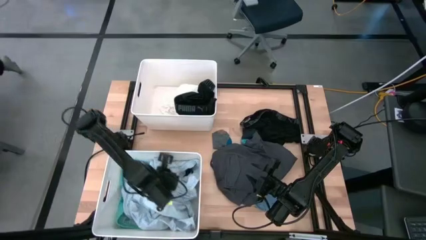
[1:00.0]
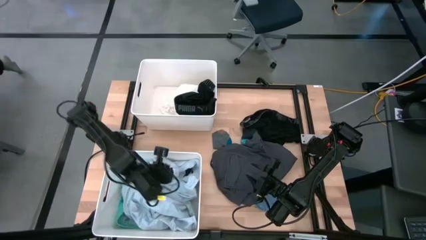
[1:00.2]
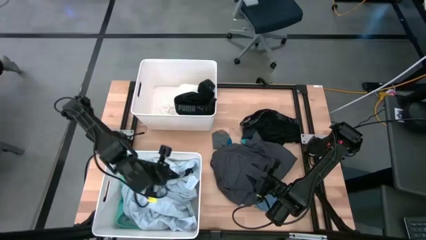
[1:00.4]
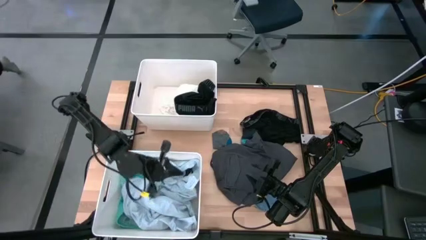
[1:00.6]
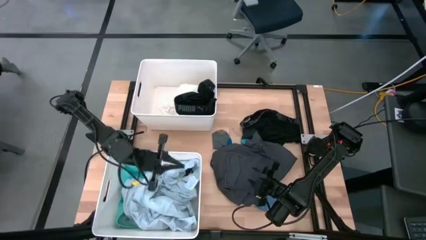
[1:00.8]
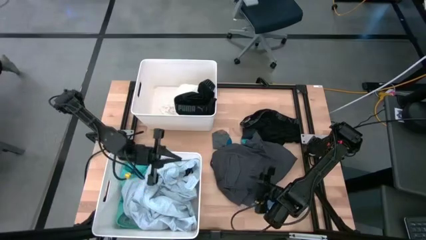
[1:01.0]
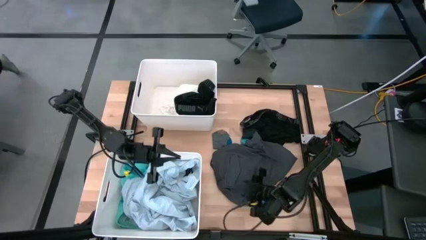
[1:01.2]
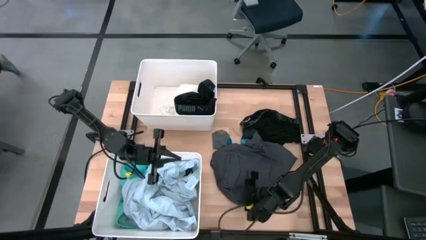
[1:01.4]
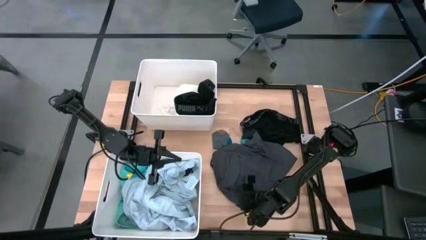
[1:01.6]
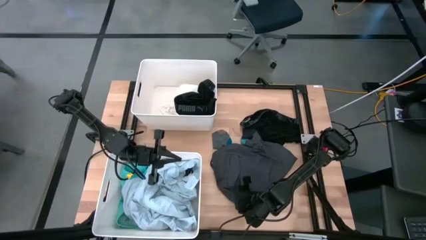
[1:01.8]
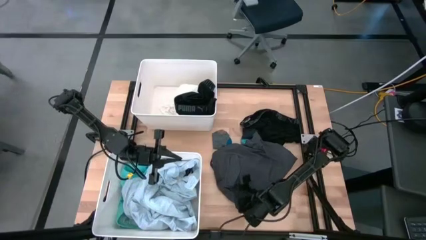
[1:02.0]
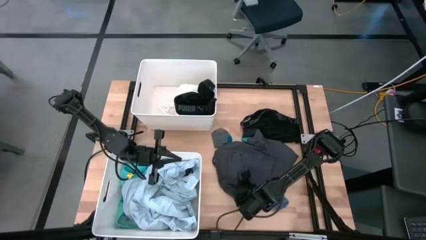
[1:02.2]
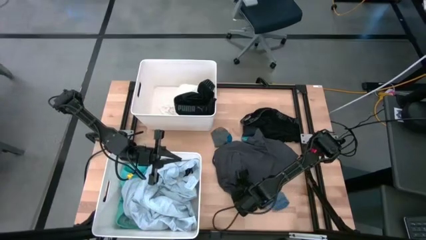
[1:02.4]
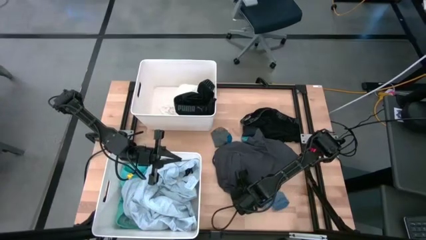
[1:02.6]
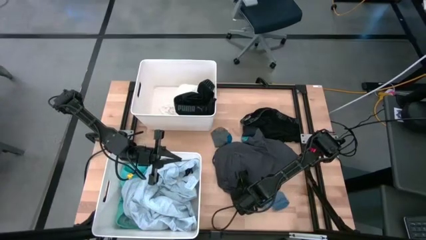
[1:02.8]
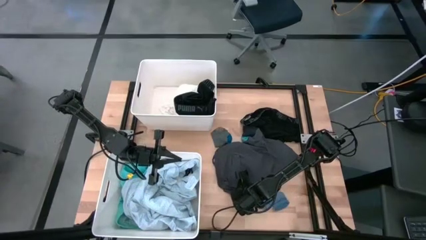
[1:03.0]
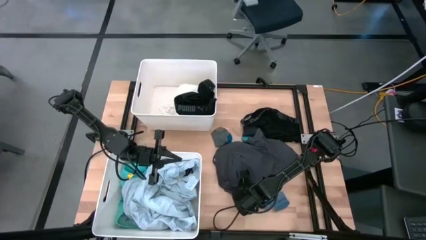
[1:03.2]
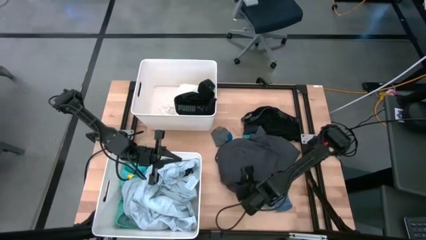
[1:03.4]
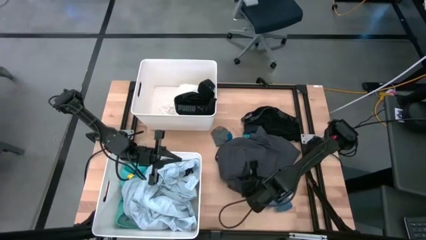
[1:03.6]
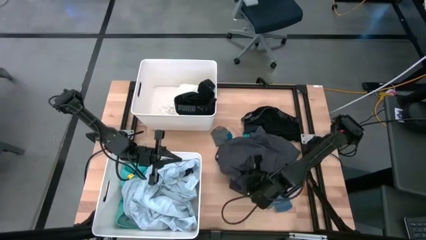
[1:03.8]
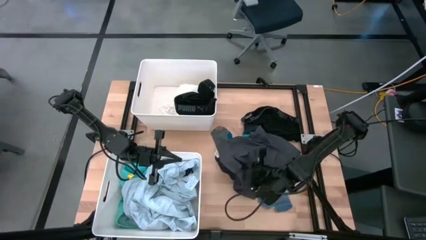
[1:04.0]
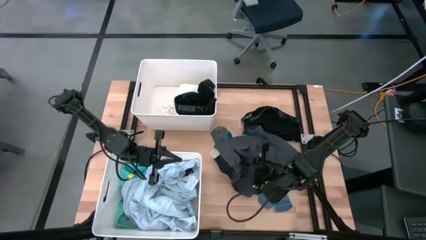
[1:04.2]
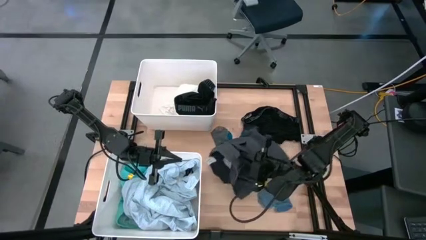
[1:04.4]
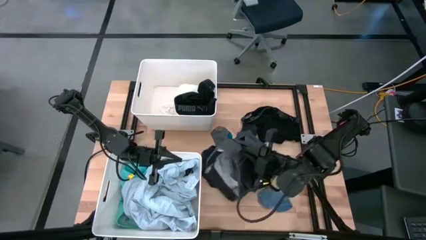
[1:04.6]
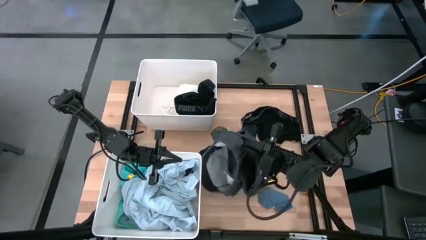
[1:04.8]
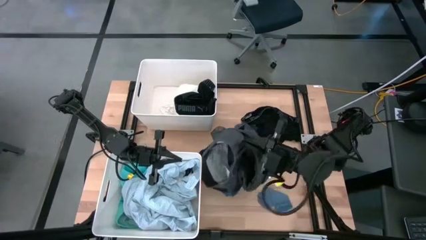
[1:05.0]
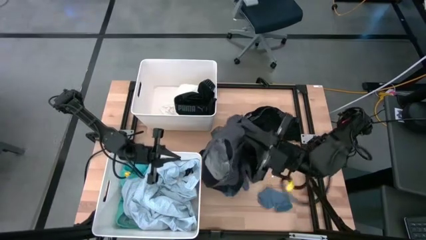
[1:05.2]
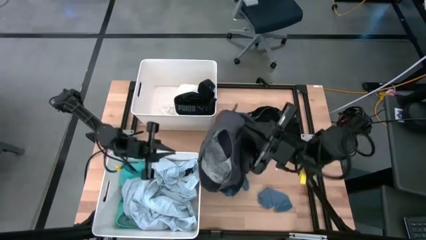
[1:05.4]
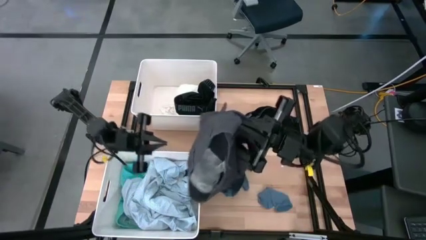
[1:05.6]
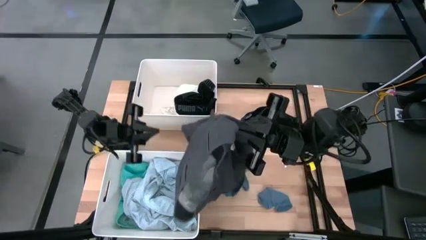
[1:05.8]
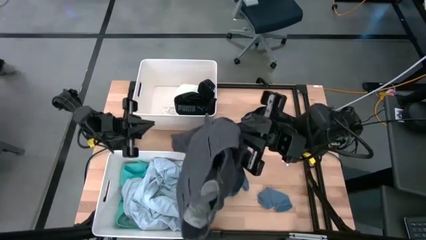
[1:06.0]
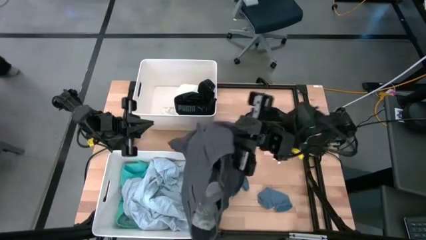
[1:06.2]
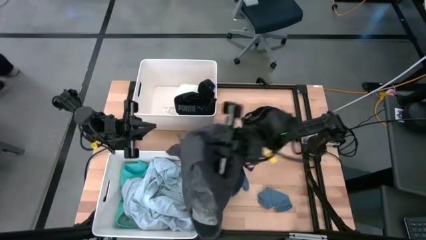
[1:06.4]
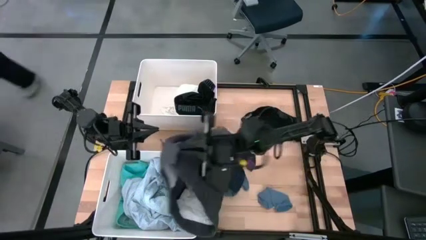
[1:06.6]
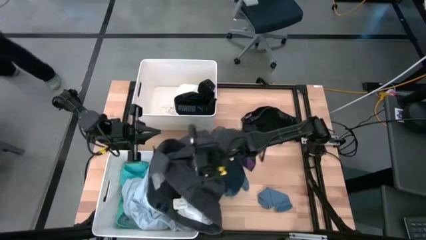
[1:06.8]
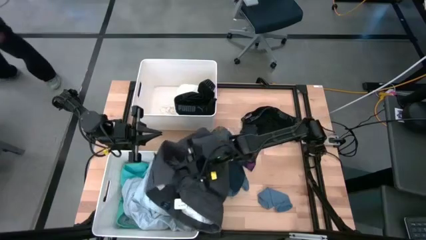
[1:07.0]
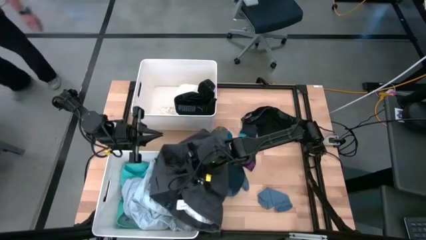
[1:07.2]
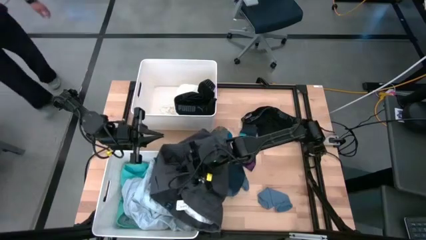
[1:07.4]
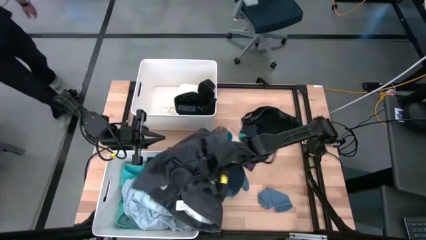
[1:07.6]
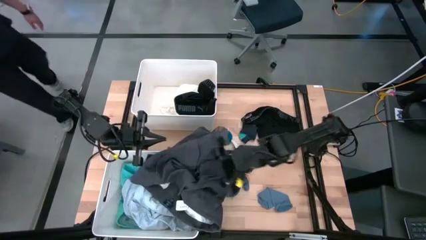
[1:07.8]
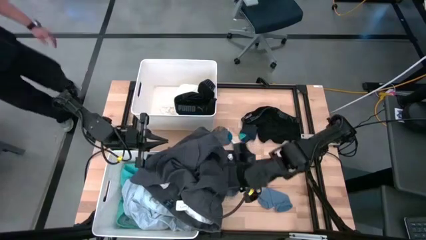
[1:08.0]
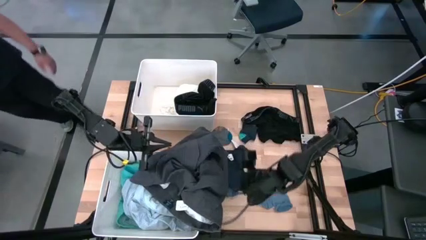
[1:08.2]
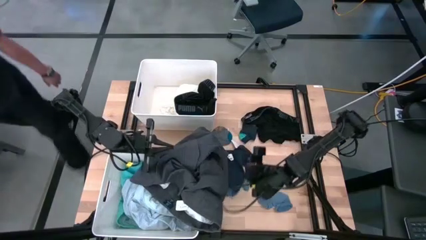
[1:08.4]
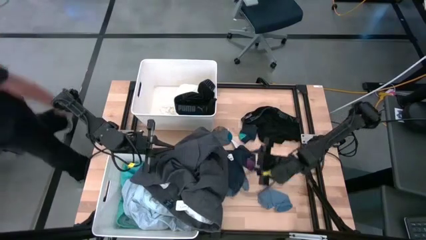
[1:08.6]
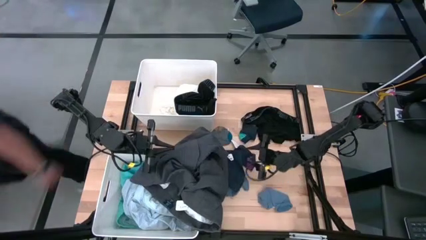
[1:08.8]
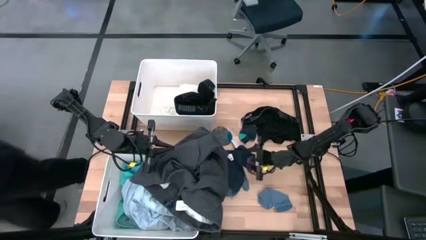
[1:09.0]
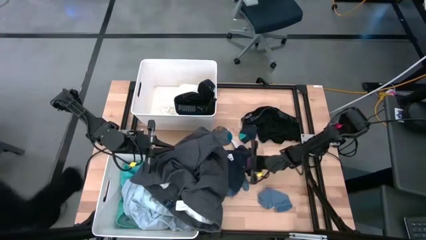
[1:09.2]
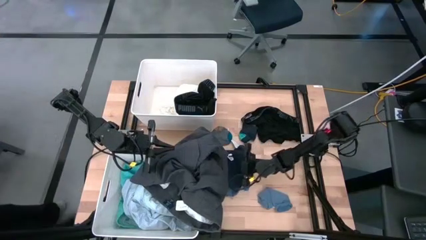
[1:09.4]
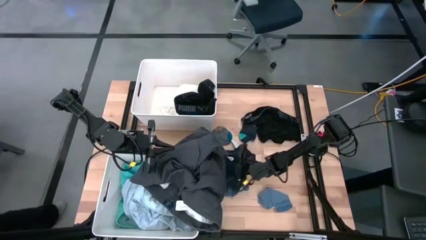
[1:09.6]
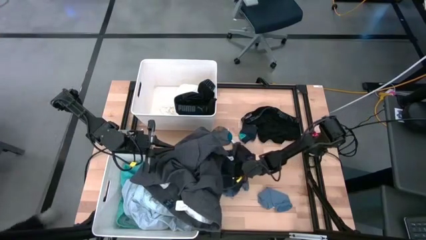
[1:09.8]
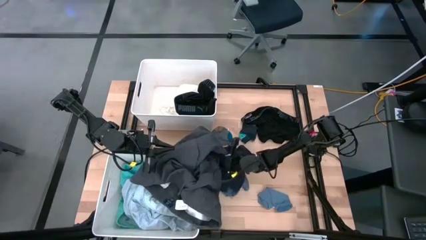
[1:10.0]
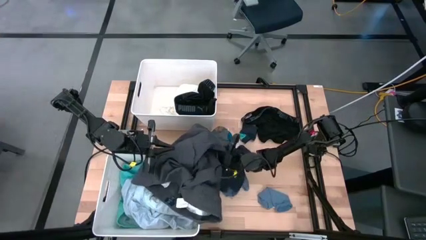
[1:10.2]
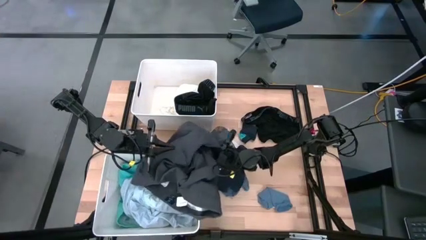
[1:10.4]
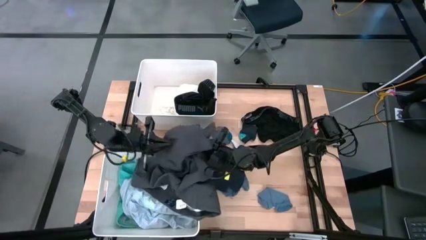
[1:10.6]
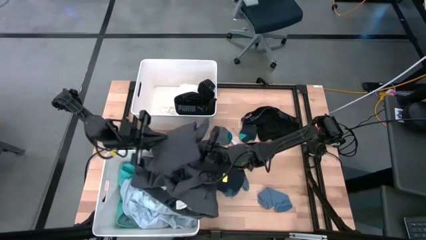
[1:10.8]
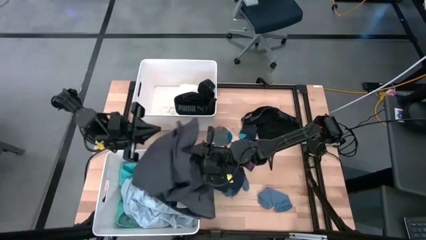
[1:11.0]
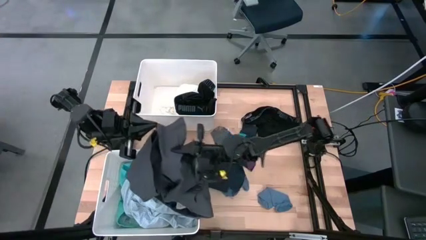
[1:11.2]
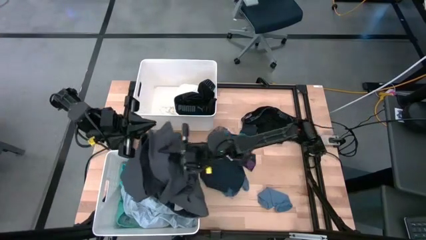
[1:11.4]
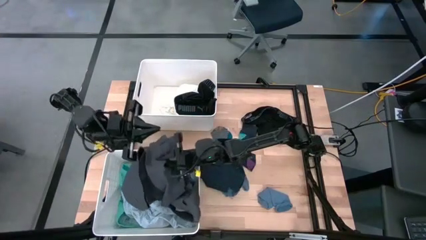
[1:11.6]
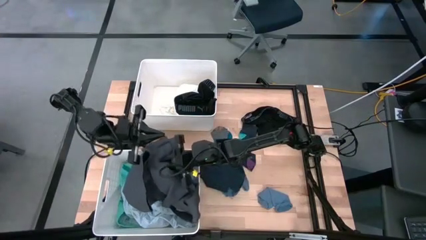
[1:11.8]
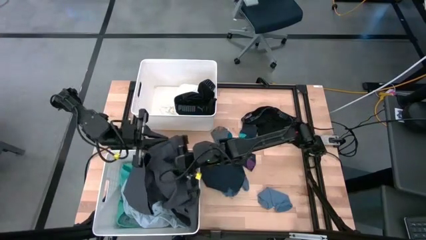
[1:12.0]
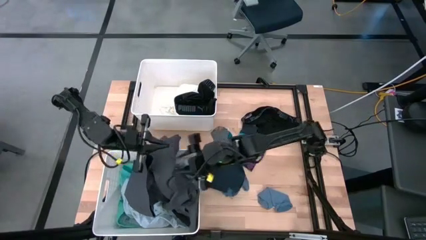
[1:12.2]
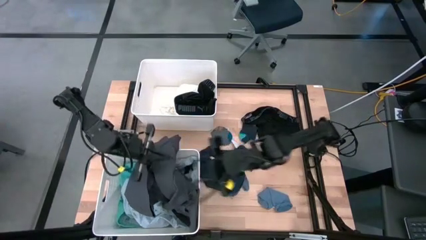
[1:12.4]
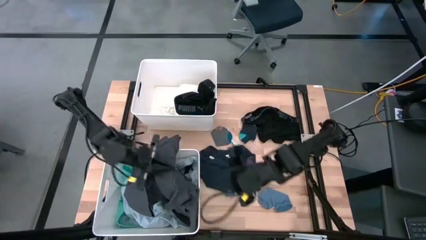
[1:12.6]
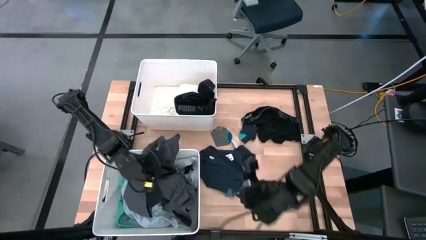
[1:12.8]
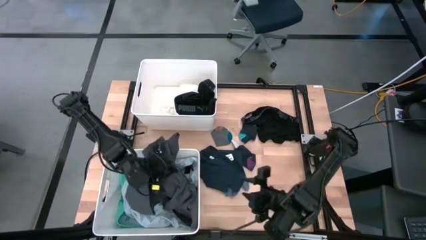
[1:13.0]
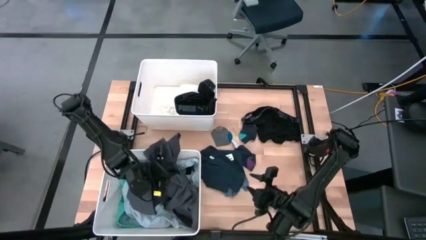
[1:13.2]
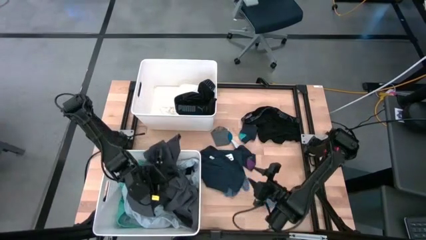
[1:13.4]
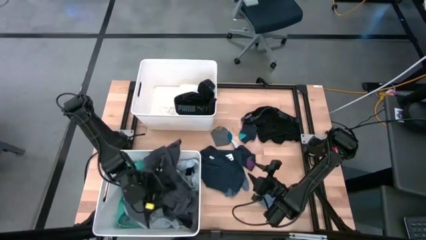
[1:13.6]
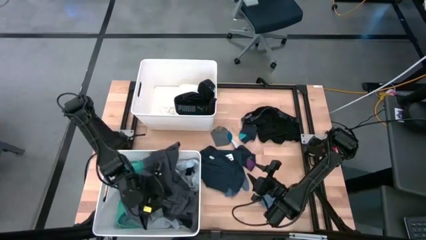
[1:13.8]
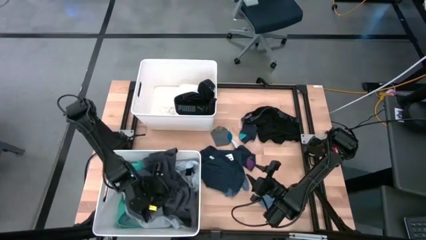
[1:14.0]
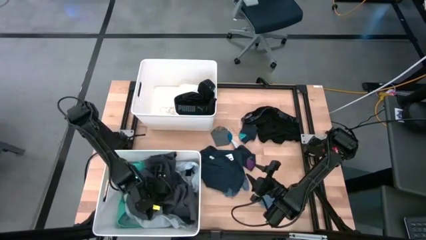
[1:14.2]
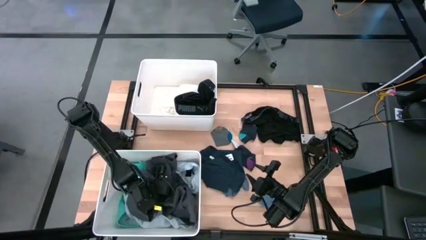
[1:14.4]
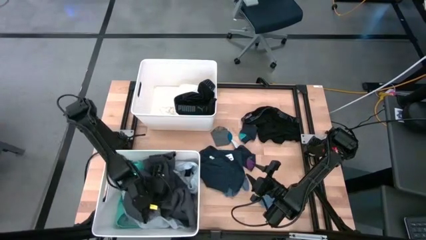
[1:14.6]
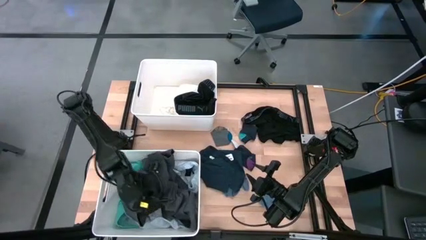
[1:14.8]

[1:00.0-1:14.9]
Task: Sort clothes
Put the gray short into the bottom laundry organizer

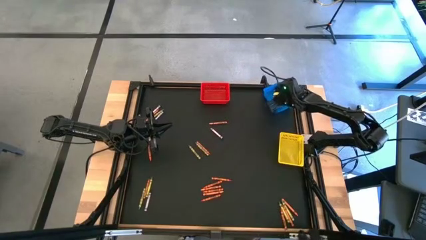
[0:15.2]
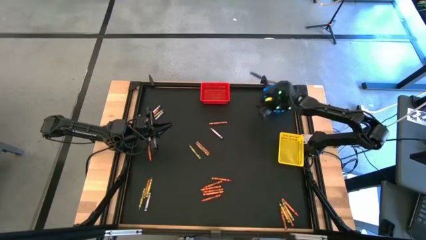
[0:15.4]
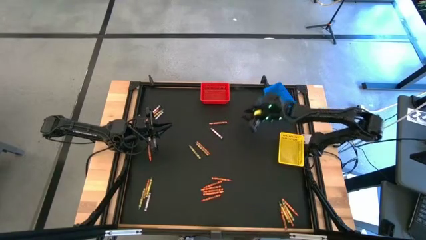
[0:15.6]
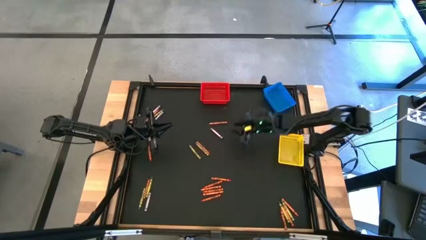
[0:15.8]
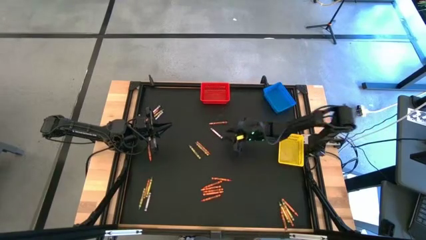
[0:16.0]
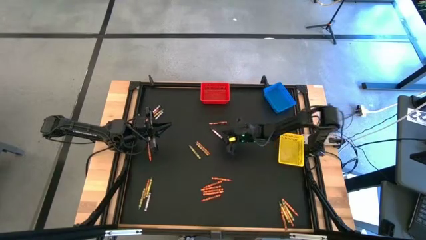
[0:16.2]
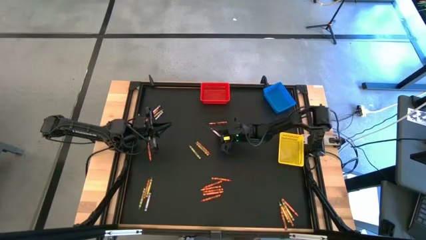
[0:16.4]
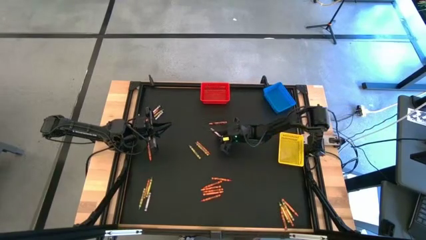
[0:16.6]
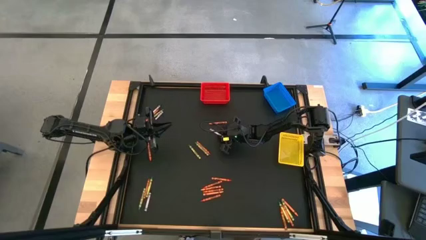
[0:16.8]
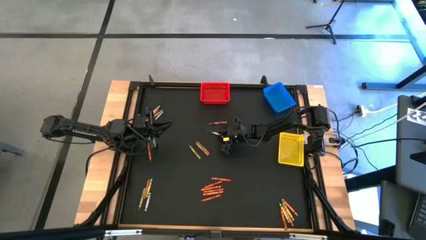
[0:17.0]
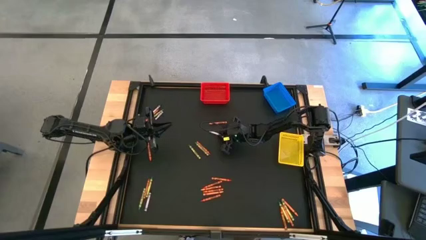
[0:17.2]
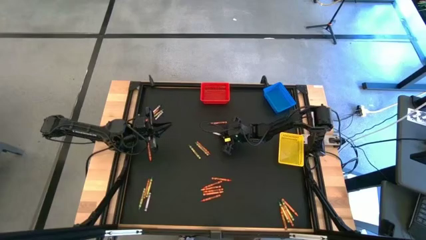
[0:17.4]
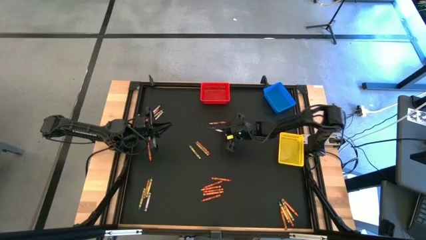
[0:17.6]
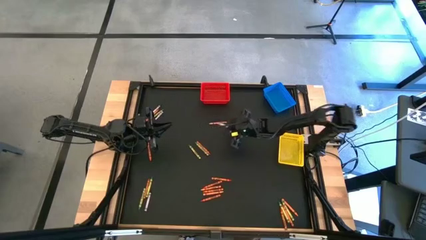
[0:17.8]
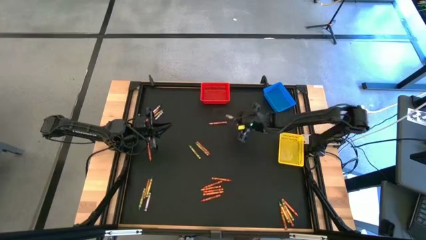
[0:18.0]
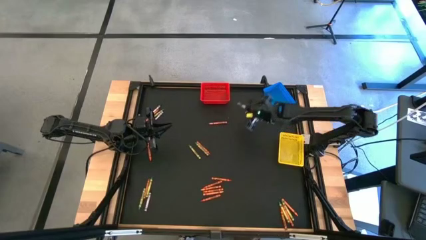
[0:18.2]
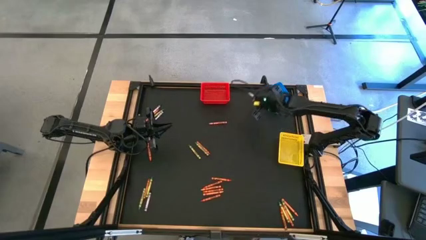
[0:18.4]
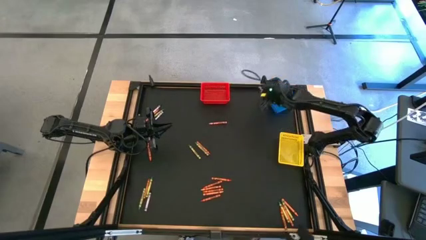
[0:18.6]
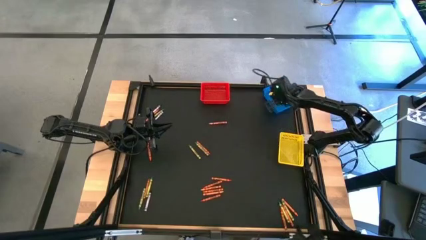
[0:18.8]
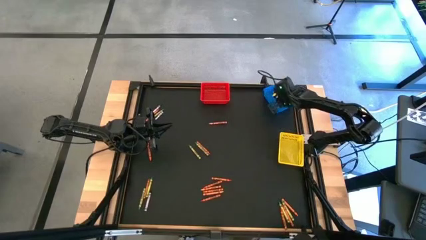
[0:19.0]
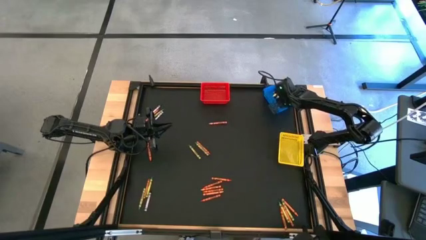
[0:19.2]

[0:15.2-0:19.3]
Task: Sort crayons
Put the black crayon into the blue bin
